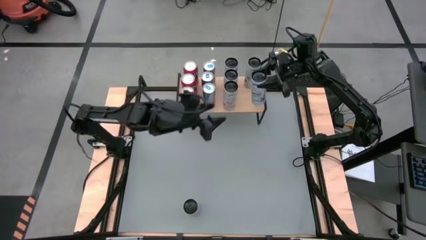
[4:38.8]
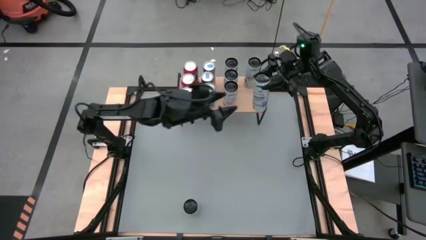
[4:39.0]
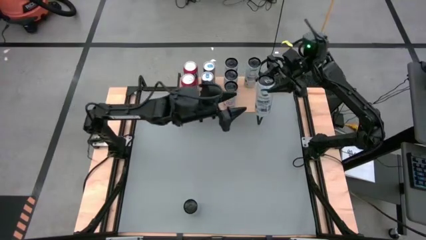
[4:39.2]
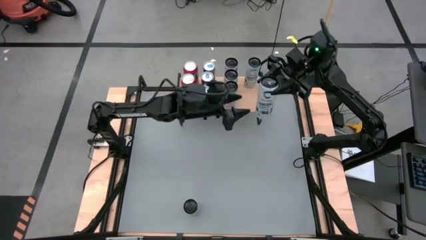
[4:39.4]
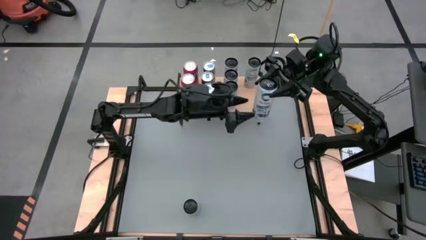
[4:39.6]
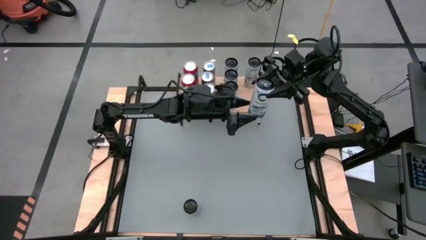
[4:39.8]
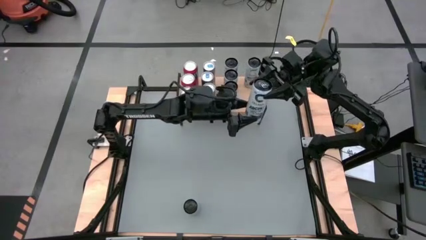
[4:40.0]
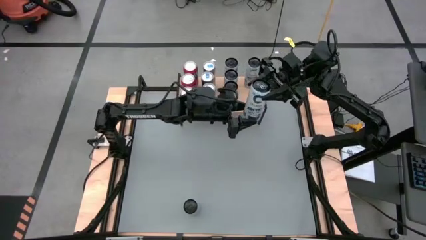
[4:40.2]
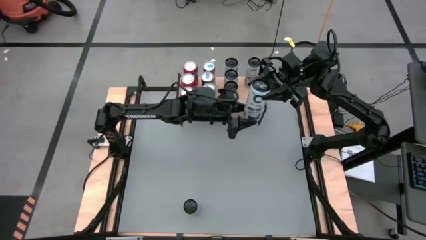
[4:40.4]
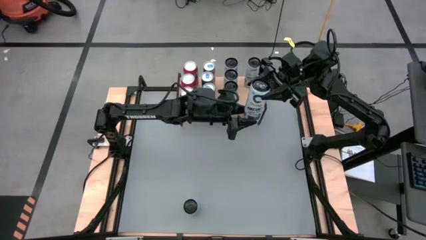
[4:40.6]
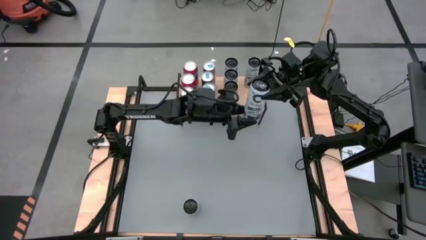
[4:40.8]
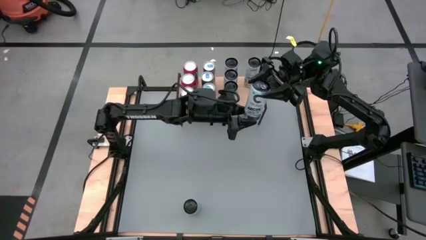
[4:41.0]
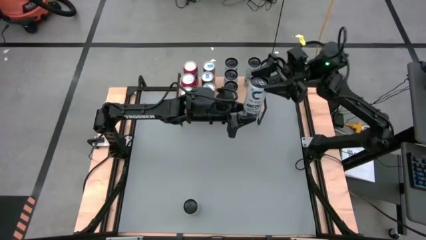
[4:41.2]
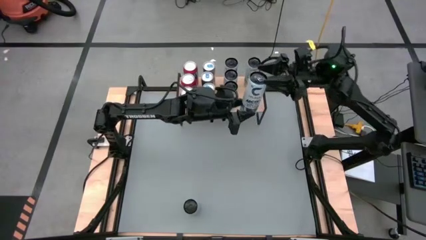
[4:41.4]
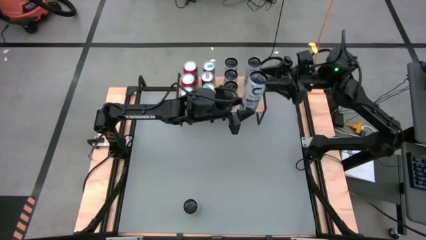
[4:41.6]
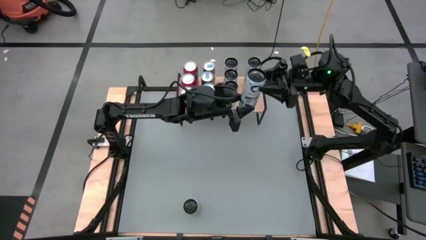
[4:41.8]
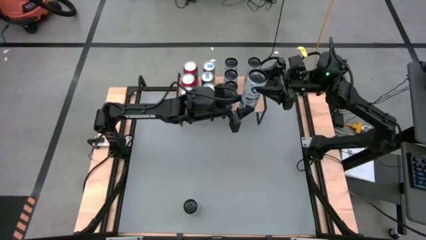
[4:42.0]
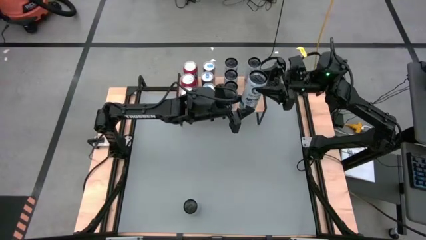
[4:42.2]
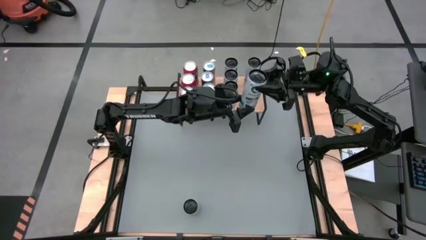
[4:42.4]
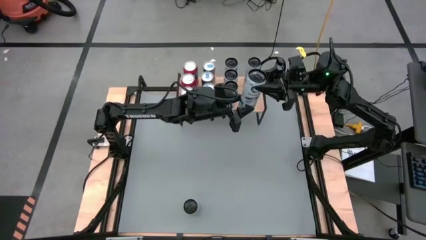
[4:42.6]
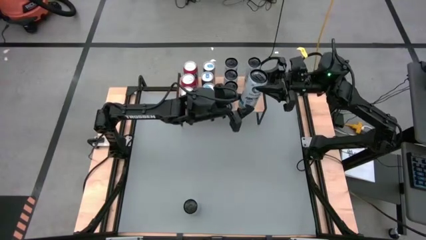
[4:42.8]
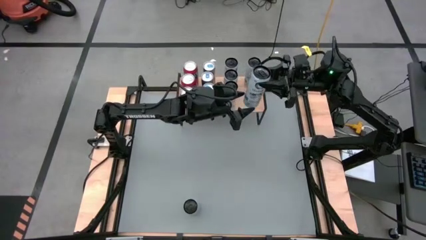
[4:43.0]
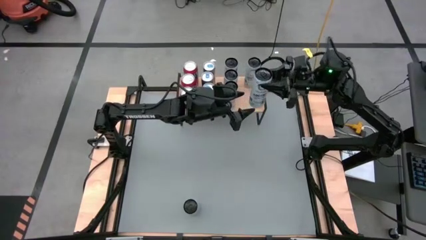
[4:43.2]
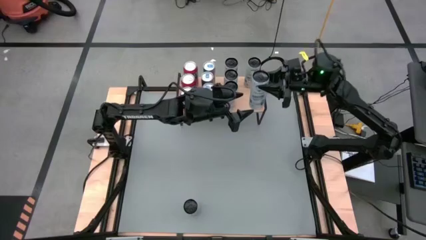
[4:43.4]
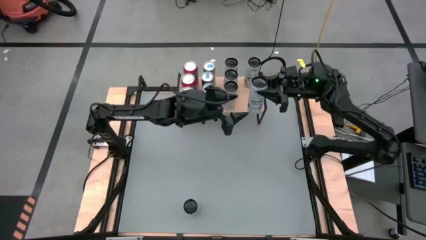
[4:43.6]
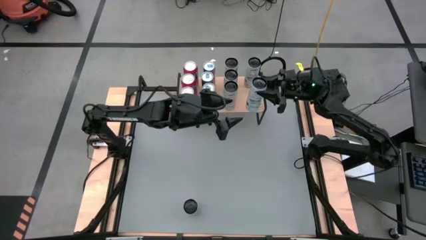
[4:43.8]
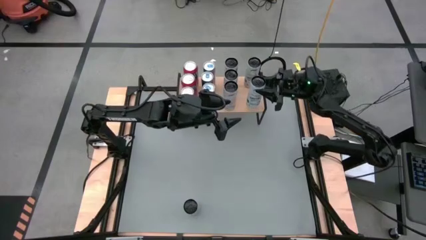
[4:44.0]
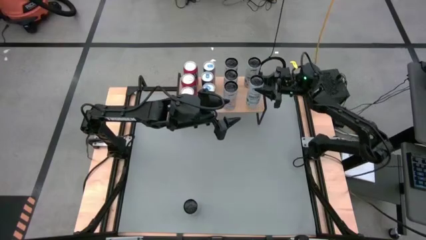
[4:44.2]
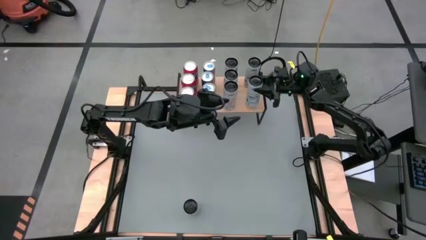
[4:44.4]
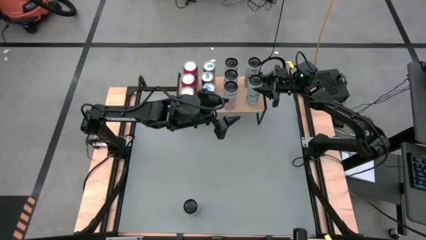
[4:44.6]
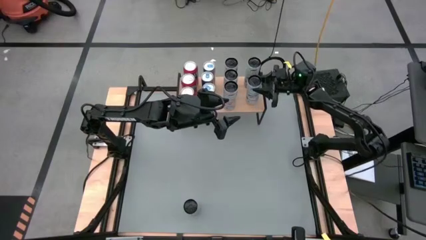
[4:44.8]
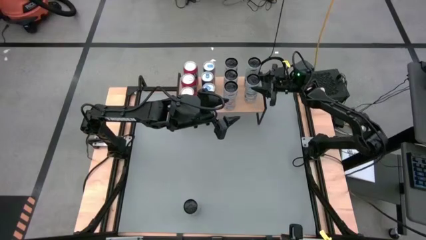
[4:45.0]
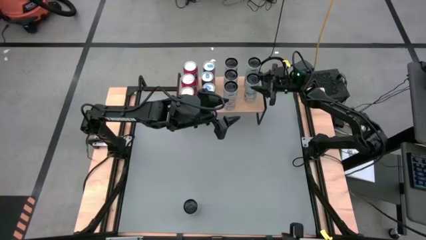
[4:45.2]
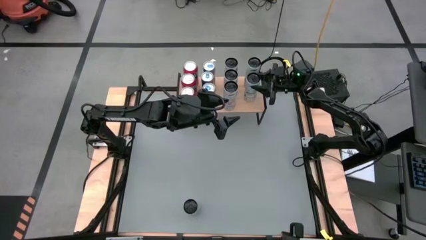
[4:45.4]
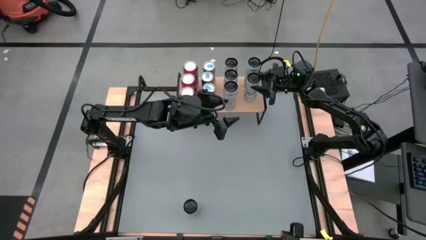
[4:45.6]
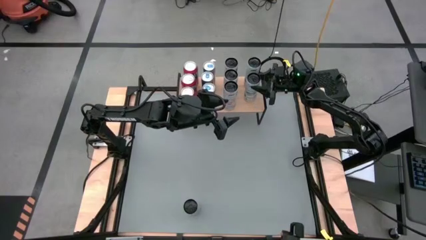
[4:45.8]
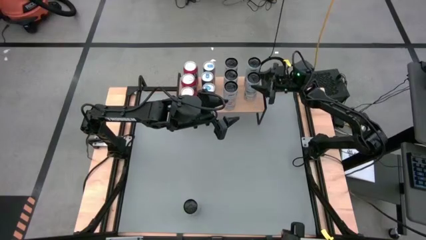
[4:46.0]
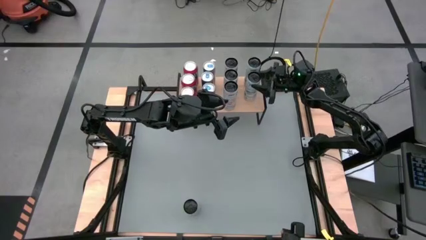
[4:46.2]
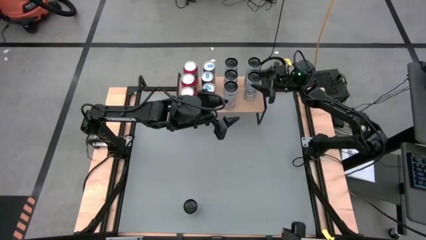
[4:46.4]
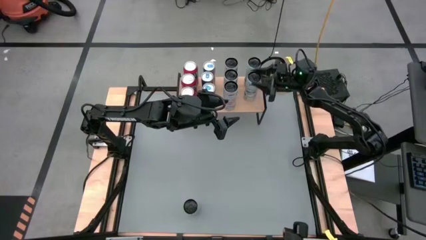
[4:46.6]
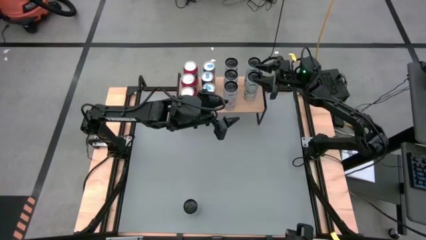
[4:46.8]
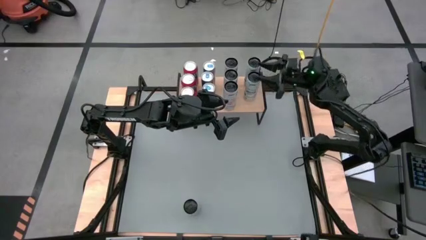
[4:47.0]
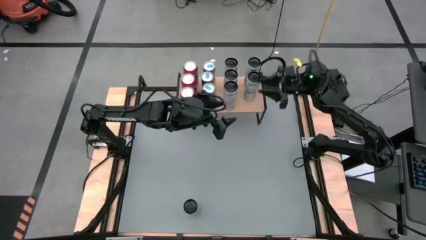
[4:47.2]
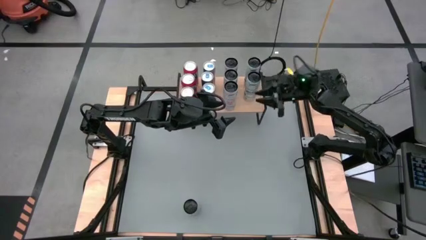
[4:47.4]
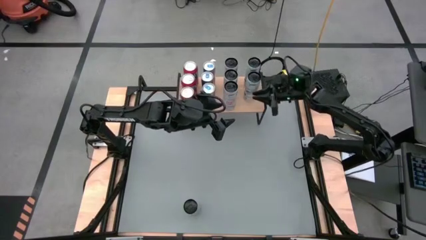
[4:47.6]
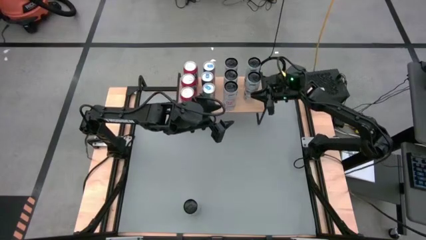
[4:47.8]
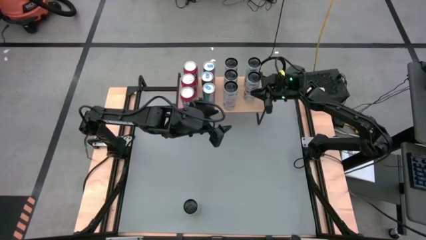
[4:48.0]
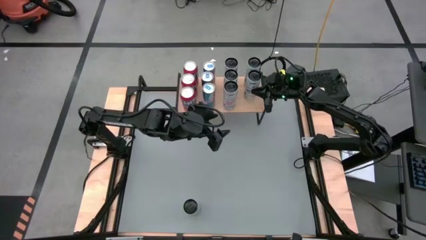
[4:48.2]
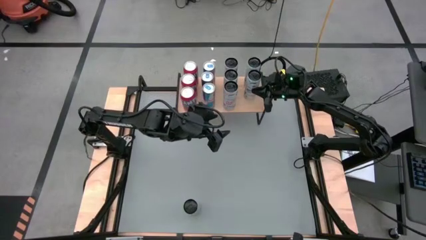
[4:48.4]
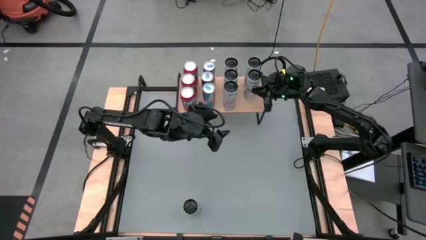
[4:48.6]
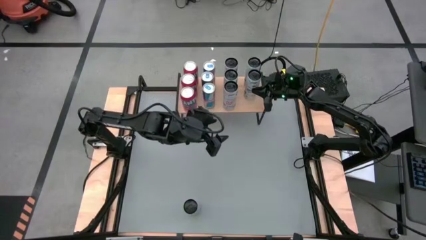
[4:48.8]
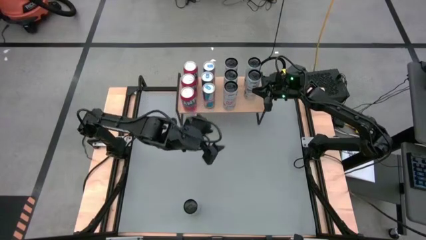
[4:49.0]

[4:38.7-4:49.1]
Task: Place canned beverage on shelf
Put the top white-blue soda can on the shelf aligned with the other white-blue soda can

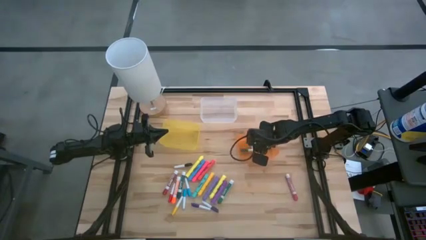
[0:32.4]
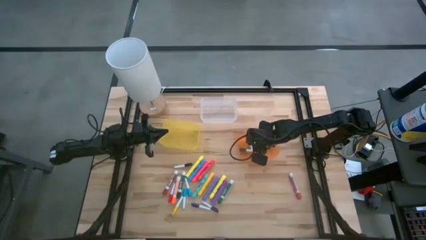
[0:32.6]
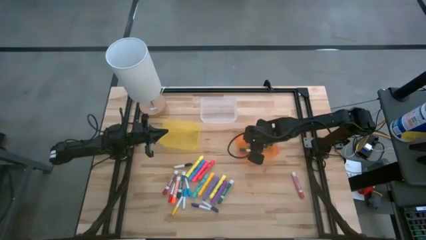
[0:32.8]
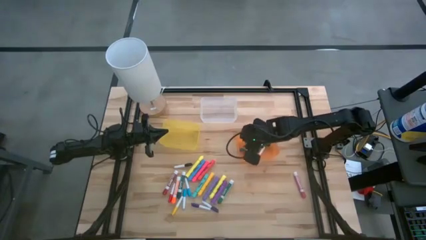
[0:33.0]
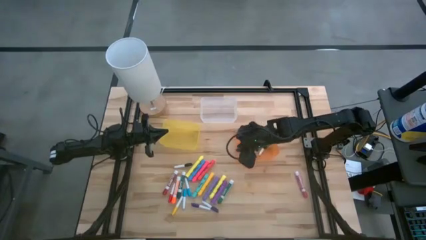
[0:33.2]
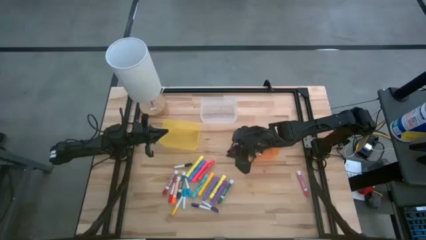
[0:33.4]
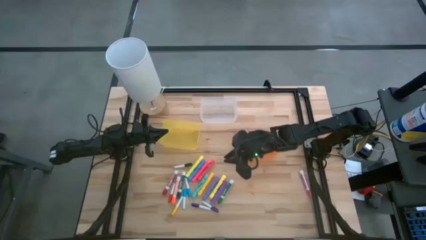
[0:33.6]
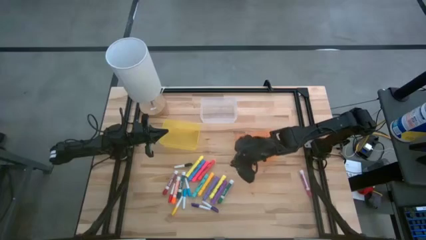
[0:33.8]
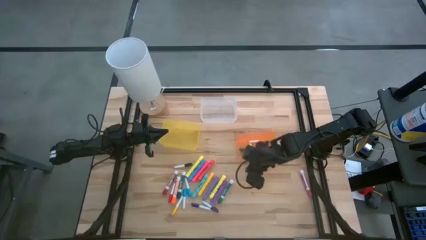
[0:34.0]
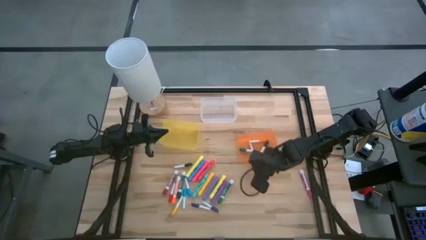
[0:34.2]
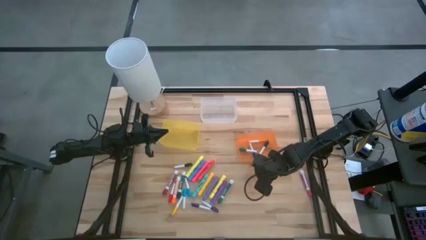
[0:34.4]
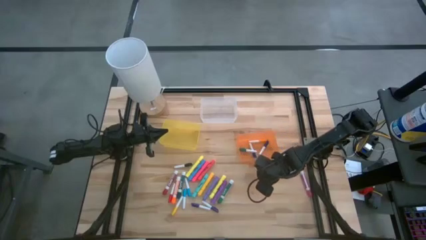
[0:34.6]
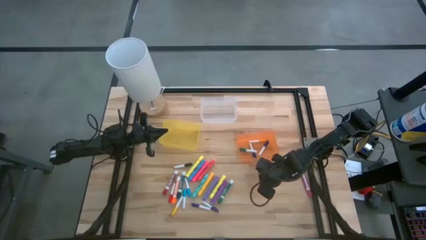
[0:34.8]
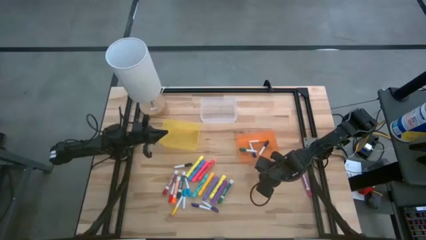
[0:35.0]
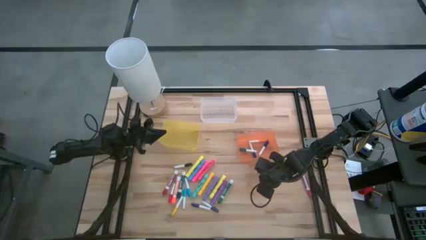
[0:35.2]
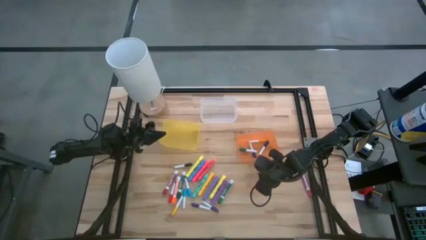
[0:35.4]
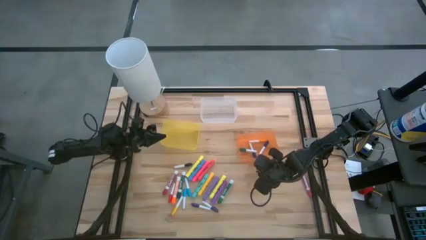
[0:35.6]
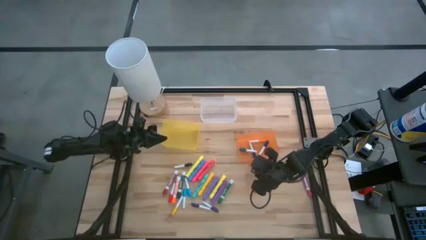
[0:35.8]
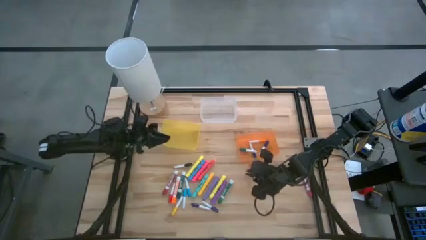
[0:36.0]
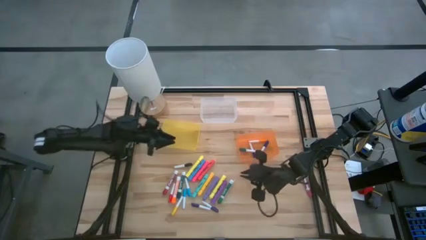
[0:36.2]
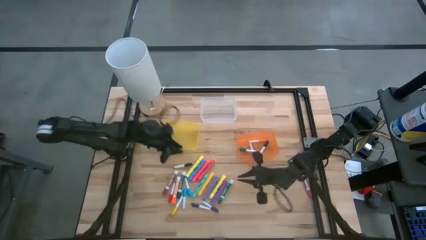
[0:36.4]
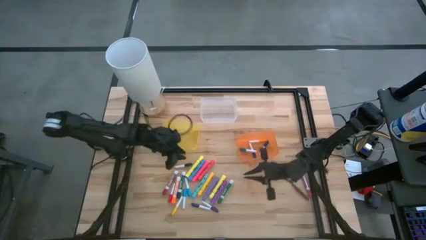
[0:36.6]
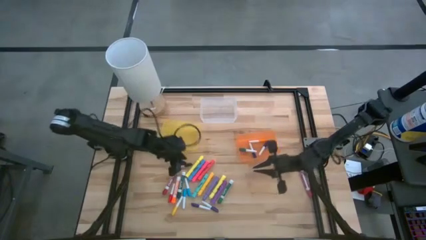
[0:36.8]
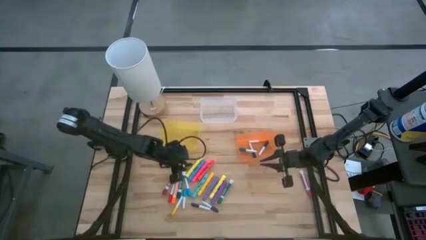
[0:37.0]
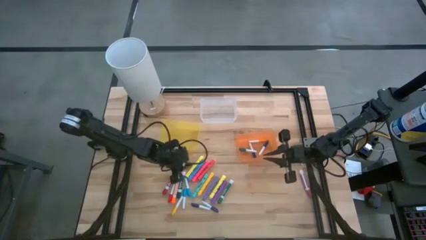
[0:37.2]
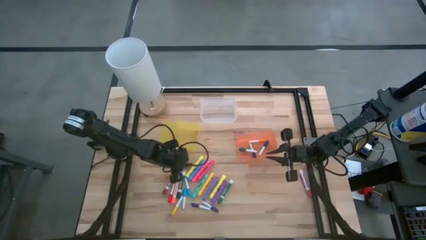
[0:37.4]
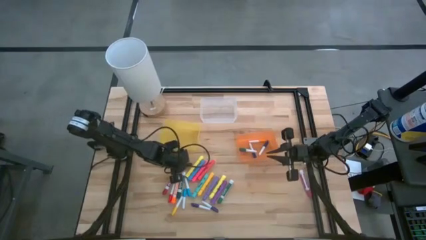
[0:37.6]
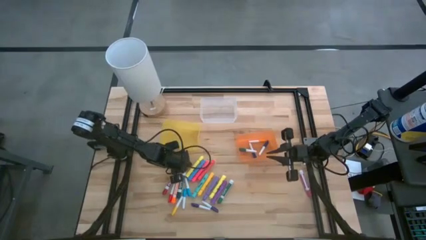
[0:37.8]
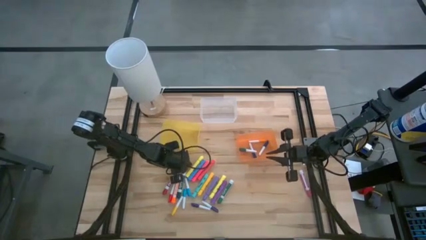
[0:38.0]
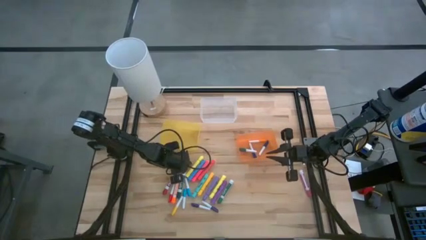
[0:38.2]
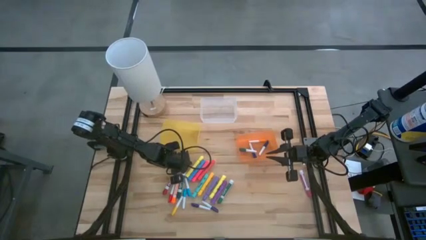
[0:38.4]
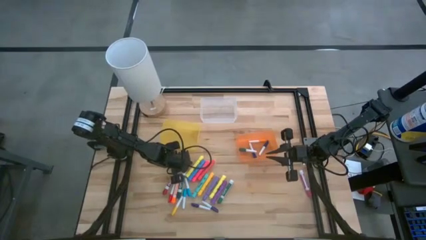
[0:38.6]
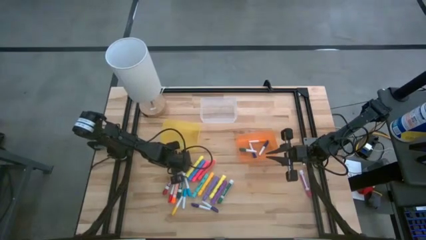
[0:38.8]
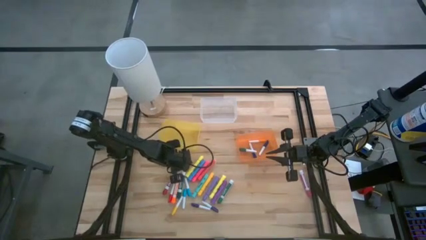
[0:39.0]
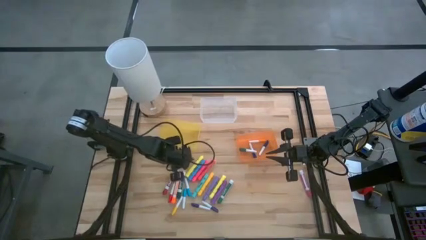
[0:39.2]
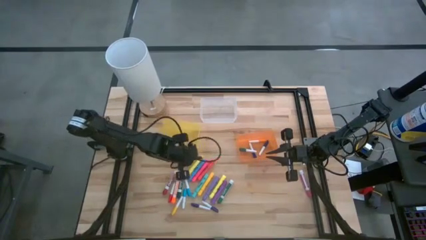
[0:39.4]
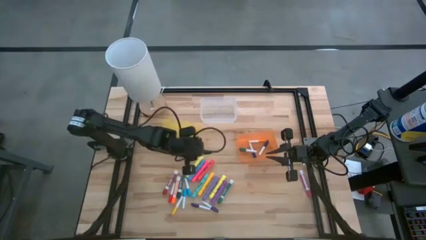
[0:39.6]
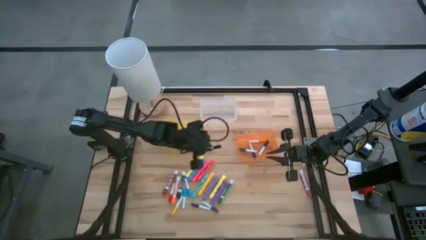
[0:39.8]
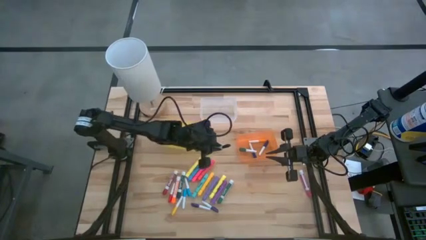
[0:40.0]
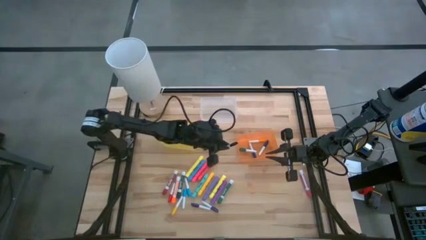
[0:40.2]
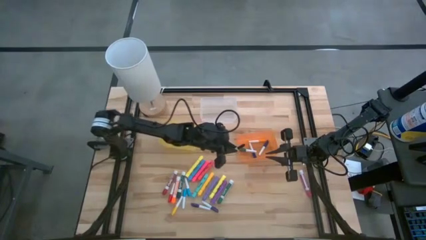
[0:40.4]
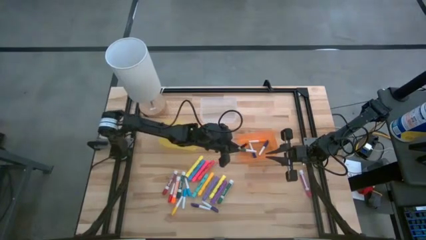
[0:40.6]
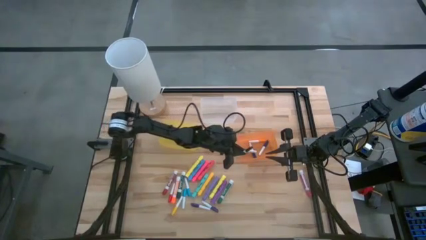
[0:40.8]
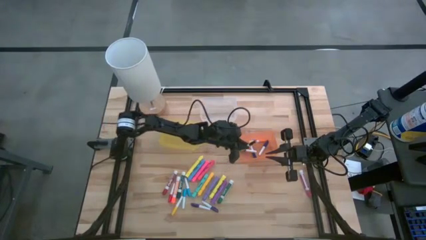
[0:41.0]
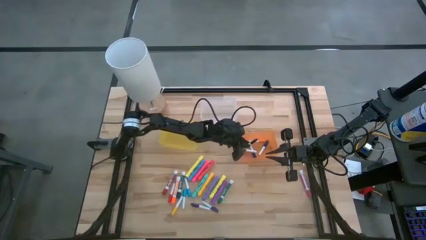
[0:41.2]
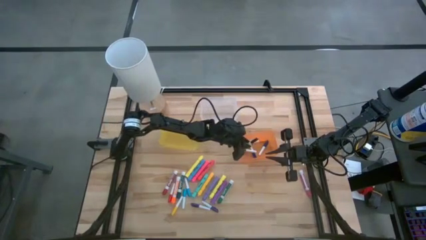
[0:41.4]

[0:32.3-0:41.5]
Task: Pick & Place Markers
Put the small black highlighter pen into the orange bin
